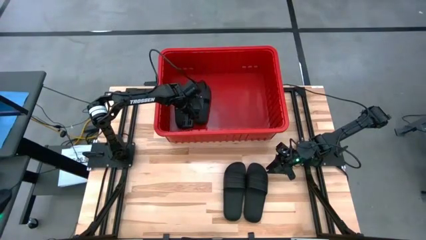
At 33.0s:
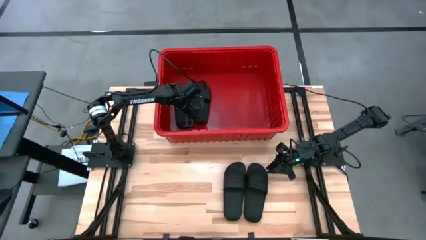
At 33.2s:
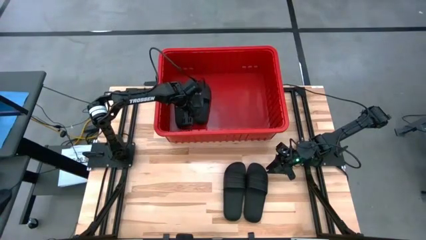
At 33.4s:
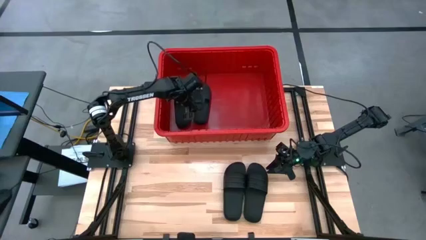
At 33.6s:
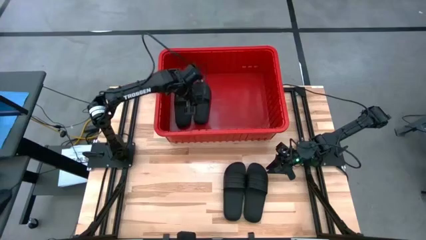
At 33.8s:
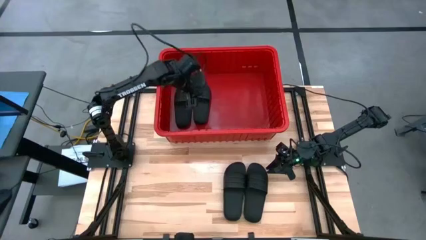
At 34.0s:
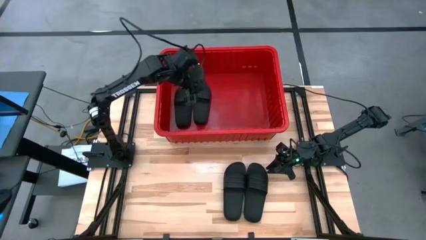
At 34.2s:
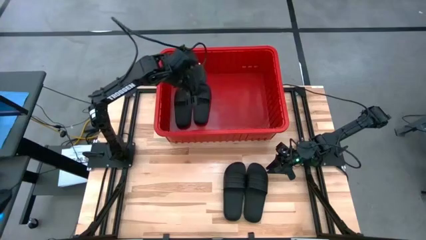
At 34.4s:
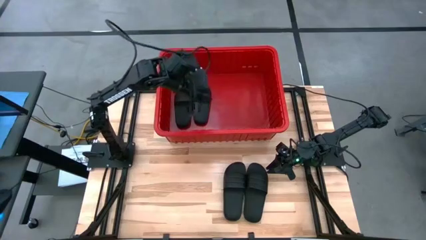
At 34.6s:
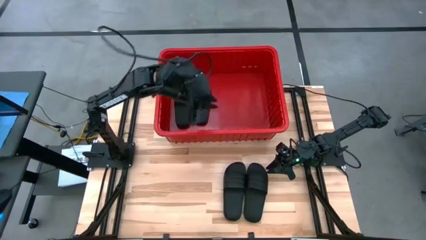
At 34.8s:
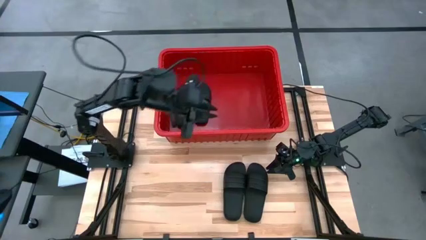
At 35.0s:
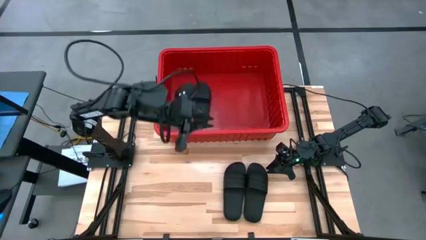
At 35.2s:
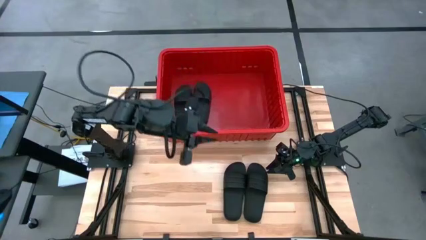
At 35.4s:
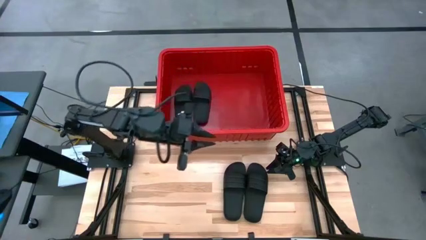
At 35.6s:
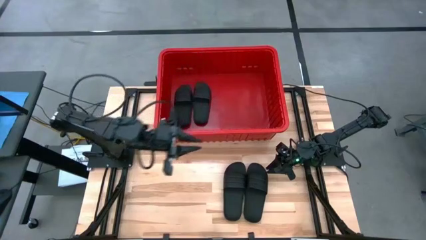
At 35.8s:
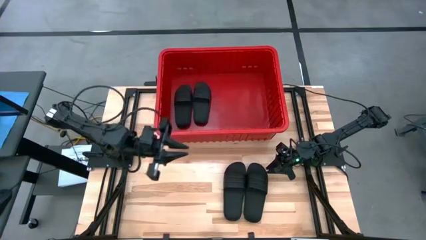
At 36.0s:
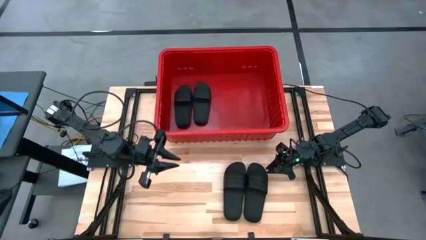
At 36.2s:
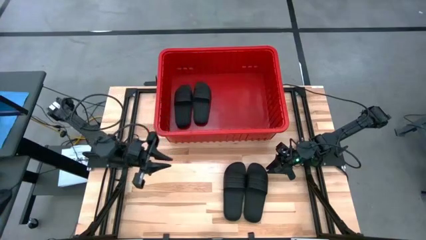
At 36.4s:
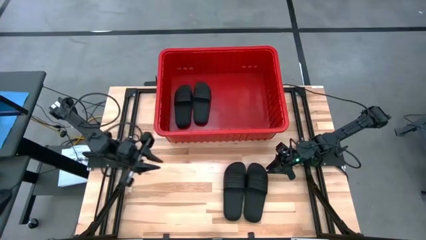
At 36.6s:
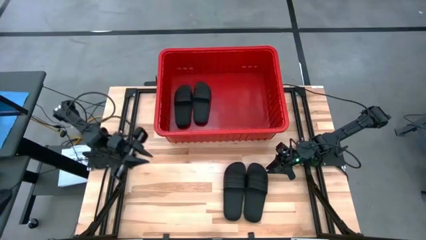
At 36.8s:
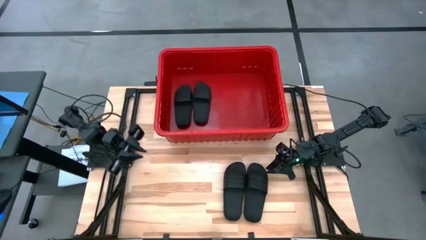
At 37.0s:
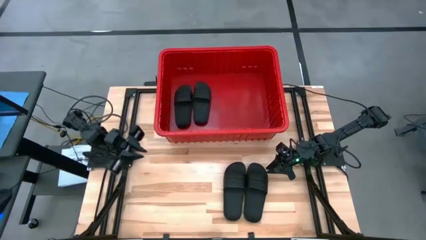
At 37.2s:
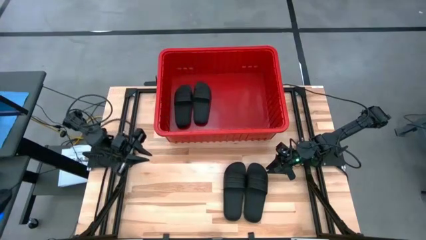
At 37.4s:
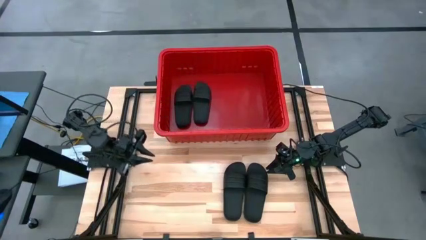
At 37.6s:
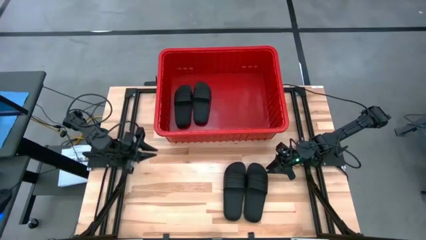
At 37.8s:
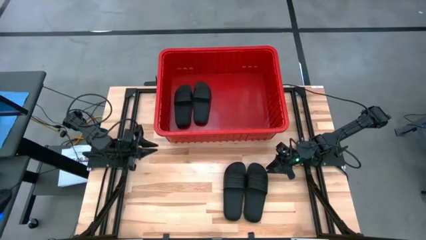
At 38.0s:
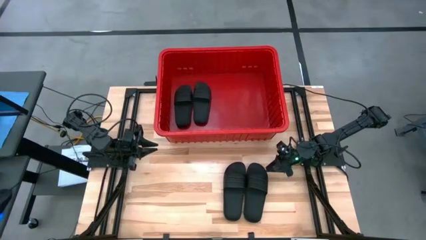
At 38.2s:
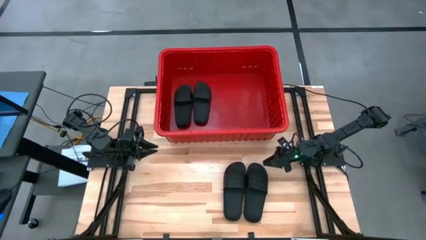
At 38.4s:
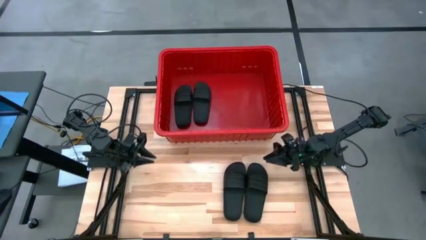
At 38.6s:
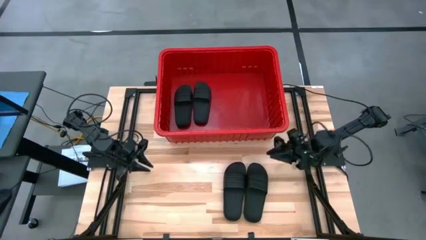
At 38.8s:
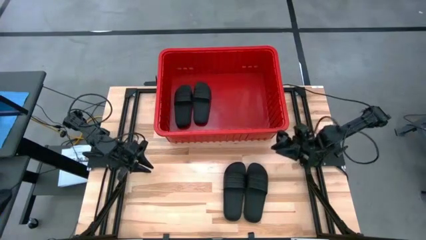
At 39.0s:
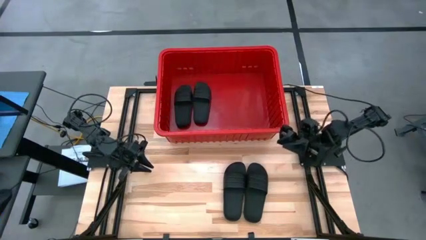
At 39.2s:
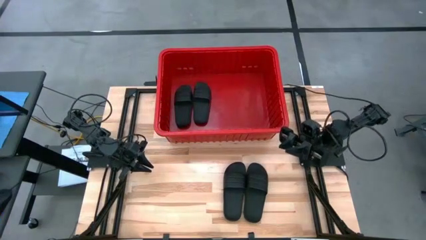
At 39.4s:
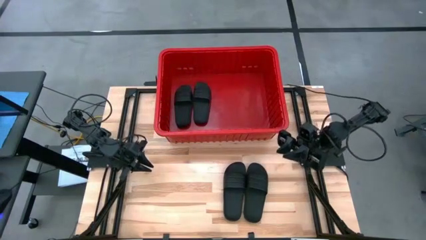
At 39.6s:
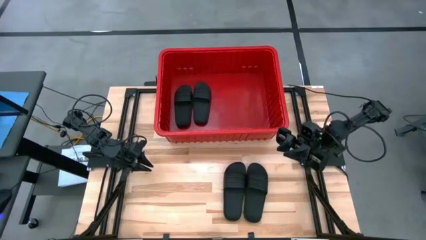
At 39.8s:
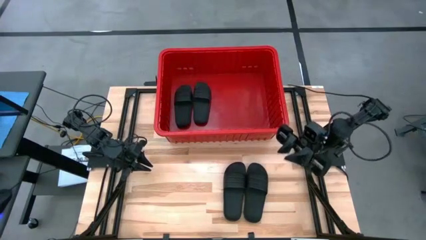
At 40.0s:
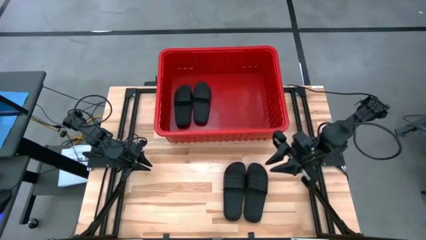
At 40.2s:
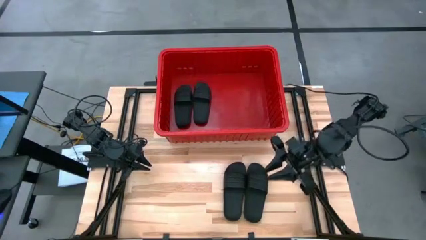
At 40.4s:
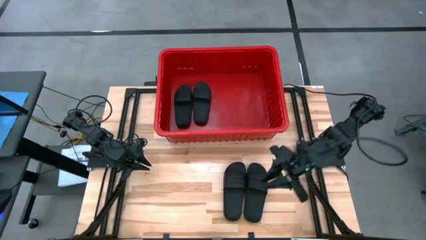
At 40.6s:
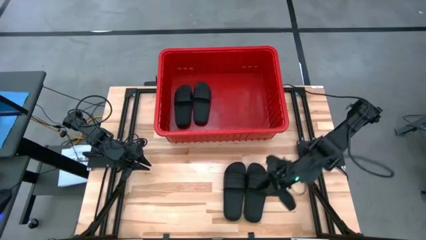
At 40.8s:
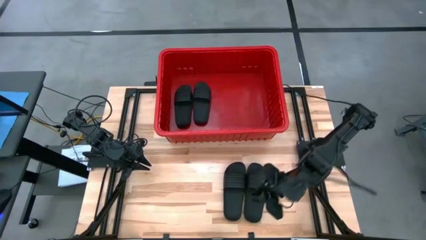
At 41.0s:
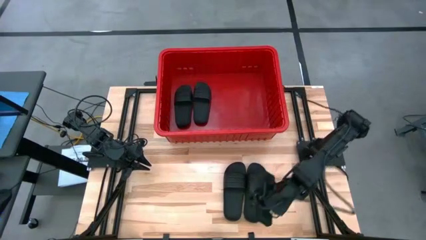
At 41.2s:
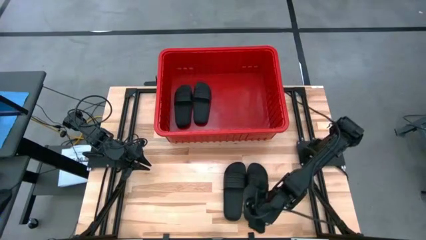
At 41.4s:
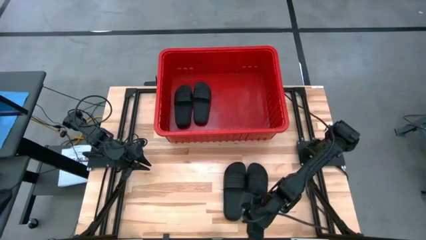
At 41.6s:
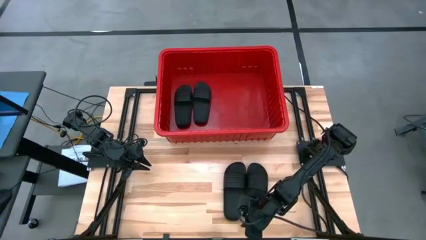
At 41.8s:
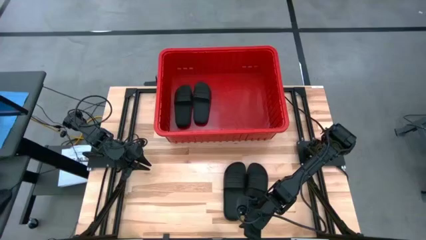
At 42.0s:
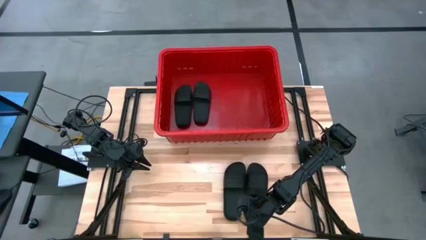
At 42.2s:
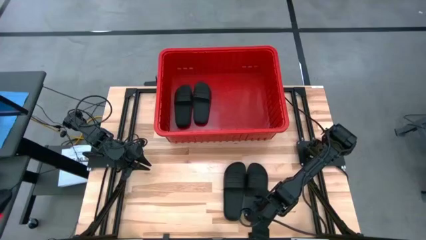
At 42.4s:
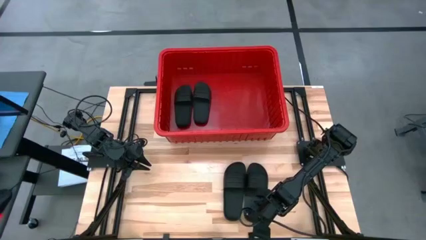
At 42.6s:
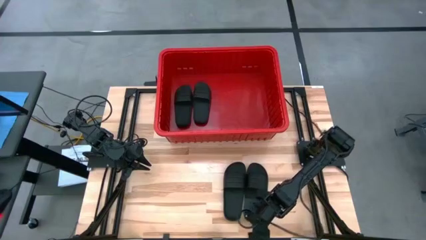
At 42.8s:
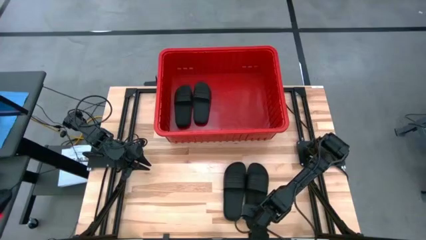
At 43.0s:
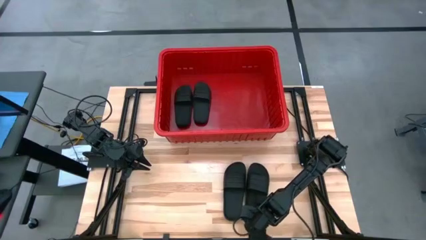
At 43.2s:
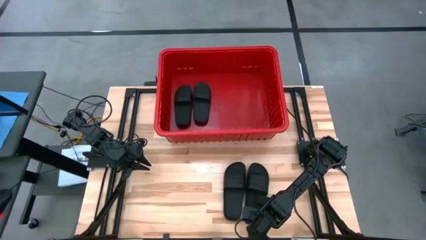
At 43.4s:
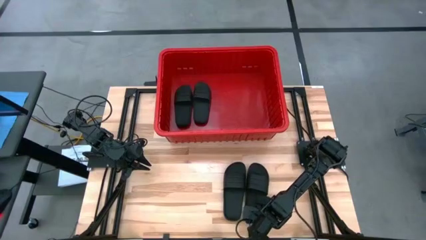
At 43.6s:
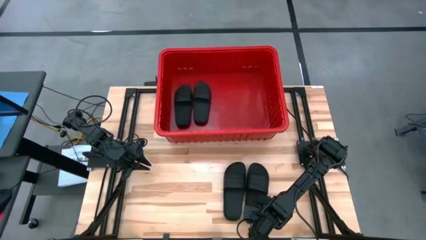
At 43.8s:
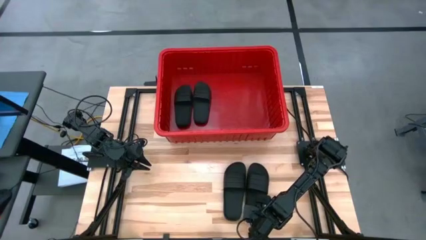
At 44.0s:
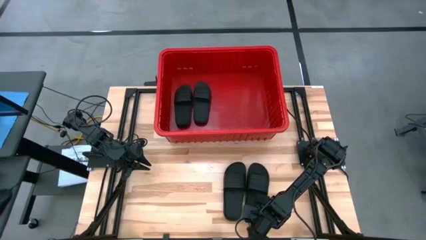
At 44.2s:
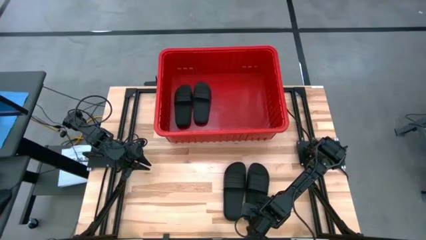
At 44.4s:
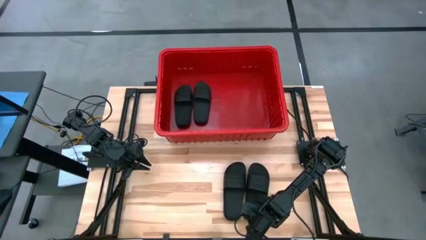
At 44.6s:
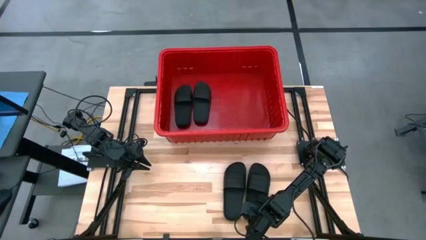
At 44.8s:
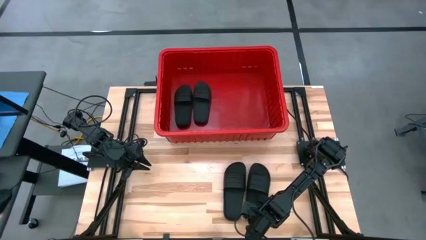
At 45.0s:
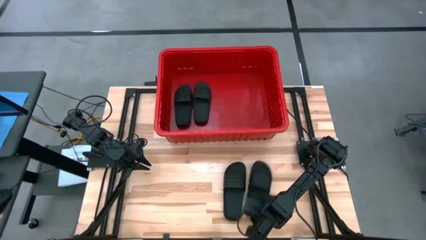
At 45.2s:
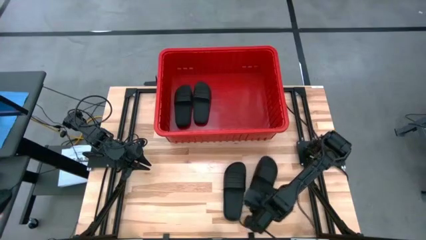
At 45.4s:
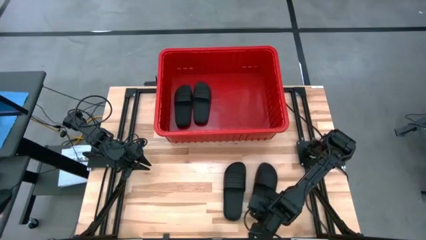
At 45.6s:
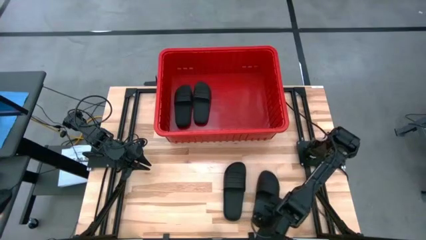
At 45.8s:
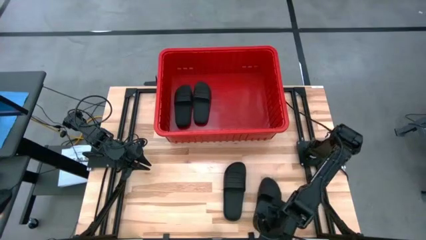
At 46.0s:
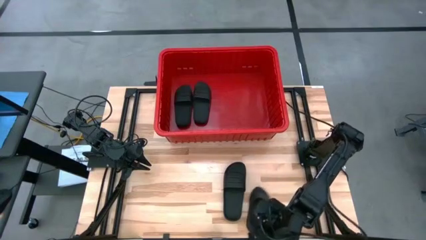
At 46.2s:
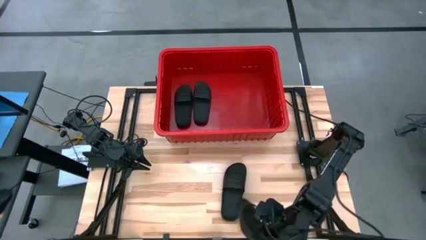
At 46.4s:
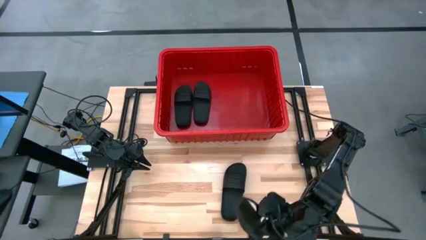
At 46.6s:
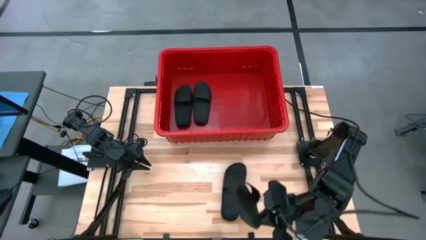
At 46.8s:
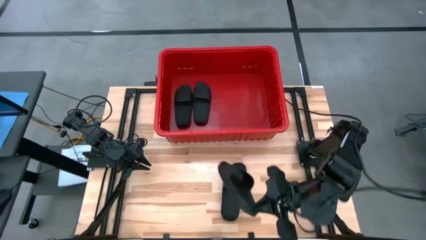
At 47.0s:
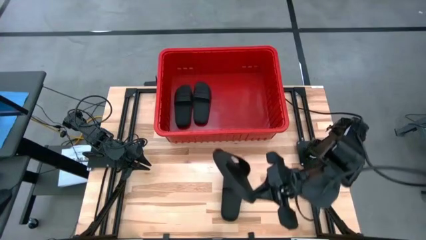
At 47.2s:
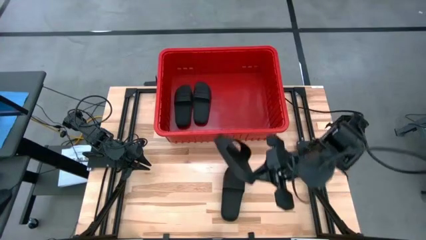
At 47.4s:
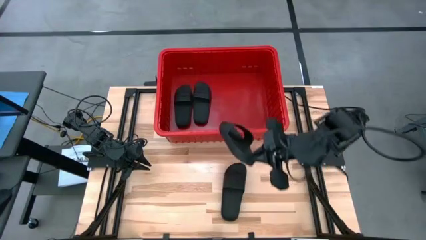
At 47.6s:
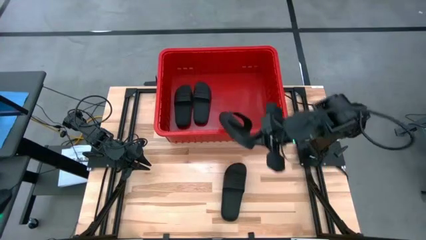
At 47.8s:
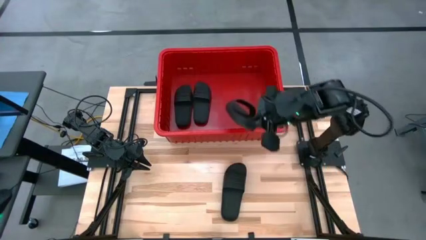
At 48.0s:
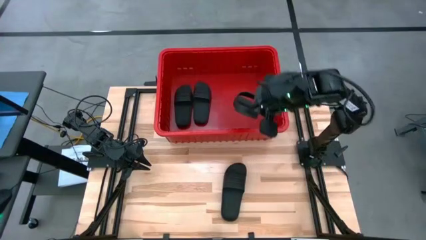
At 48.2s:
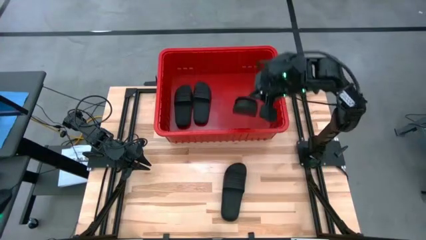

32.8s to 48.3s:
Task: Pick and place slides into bin
Put the black slides into the red box
